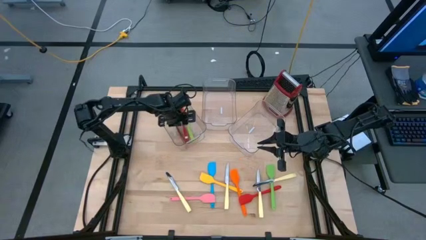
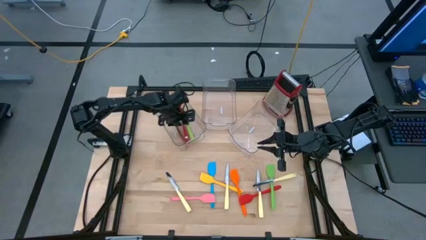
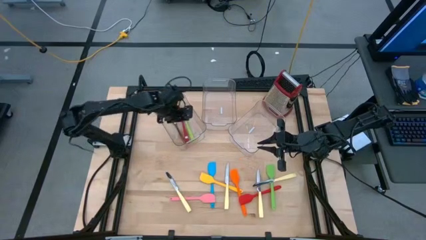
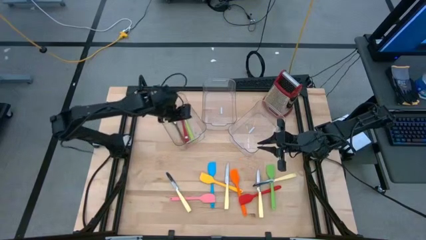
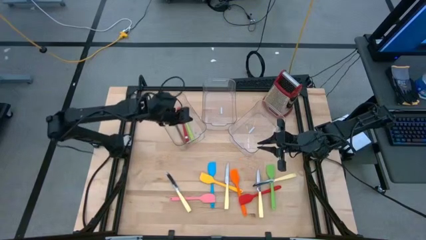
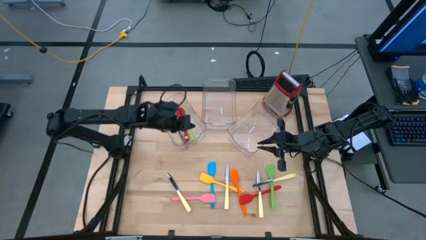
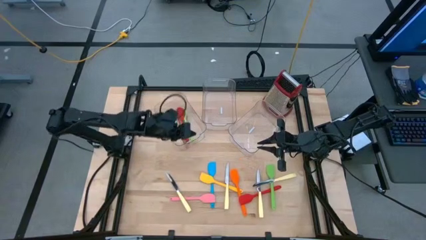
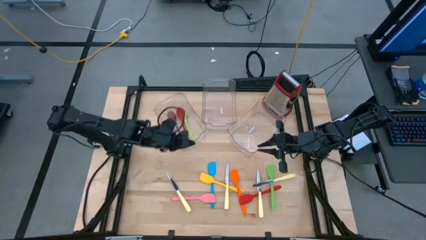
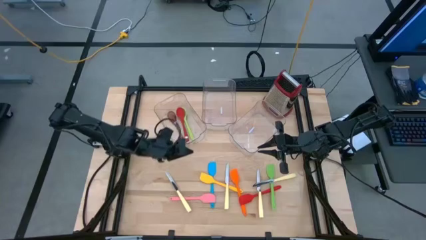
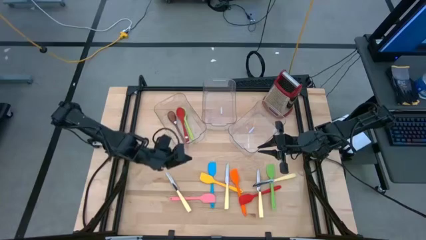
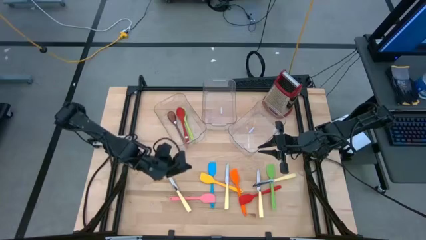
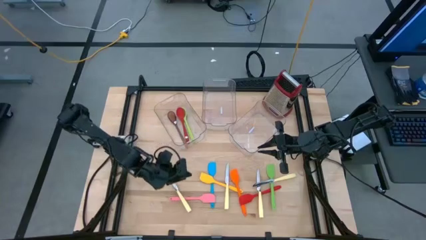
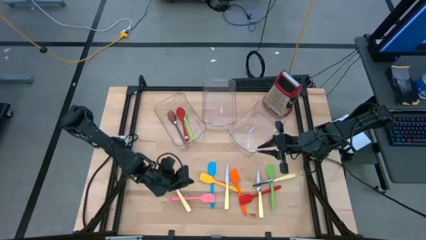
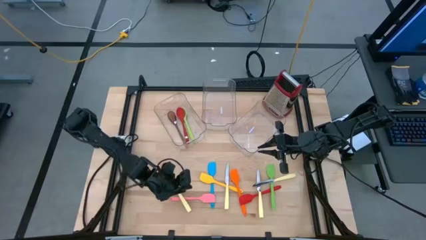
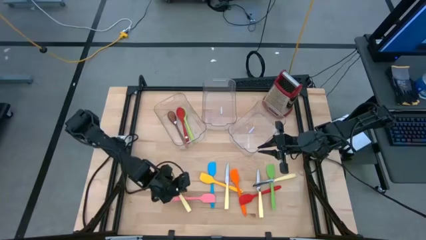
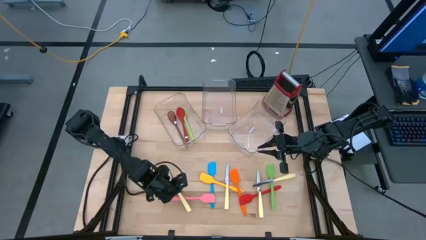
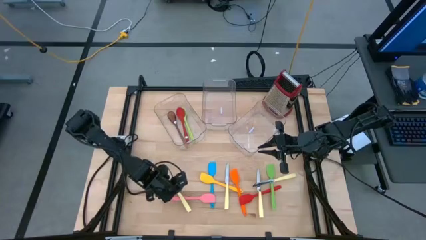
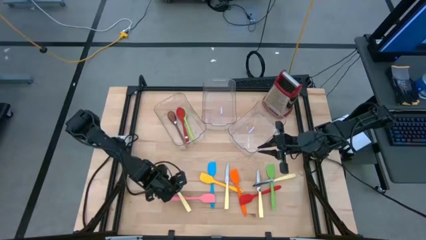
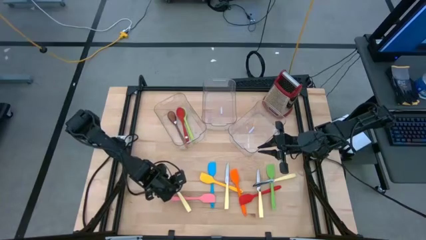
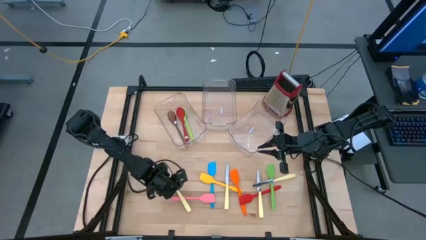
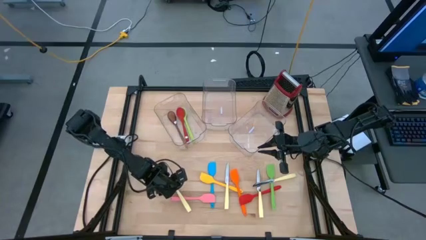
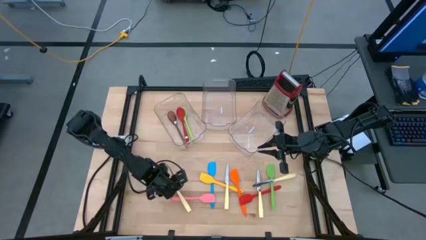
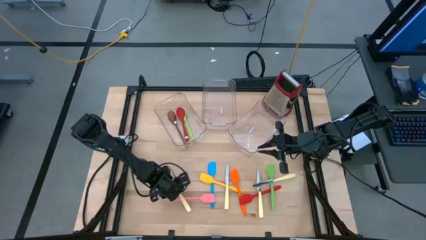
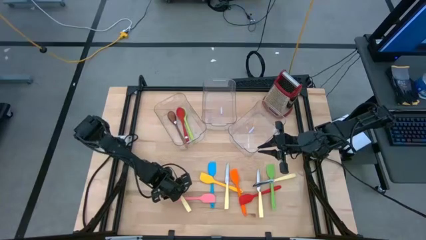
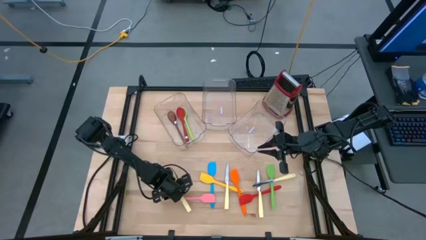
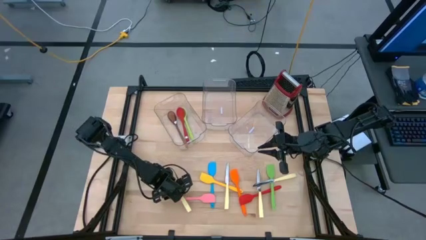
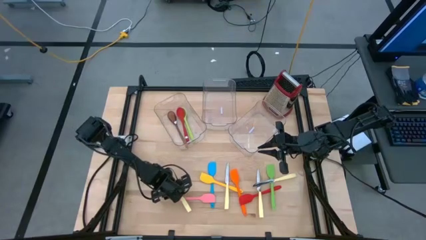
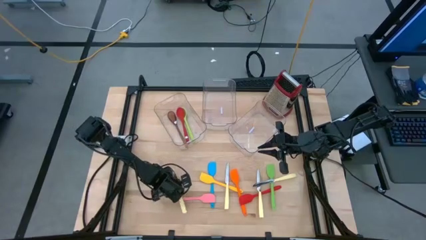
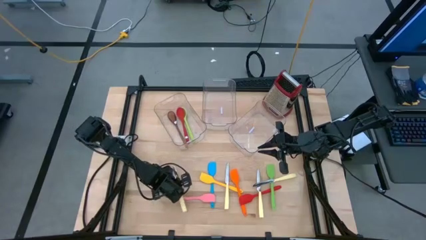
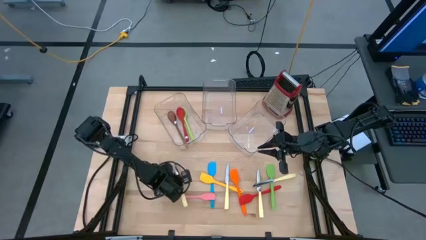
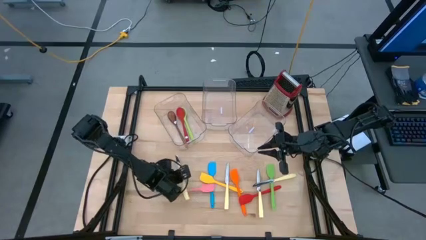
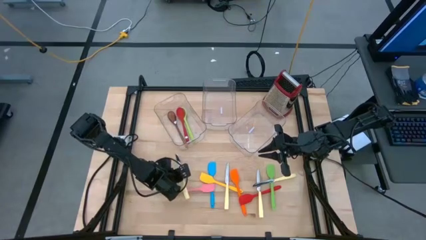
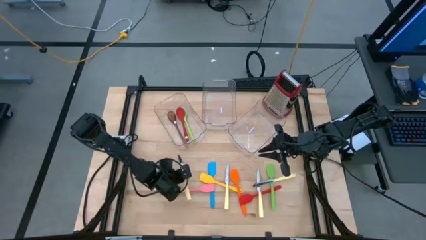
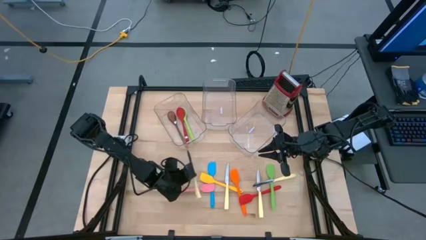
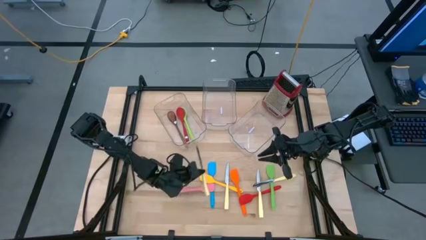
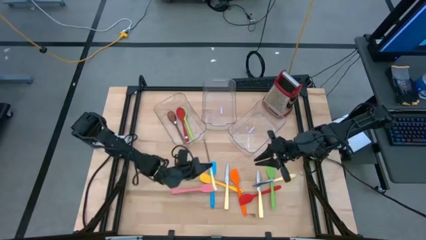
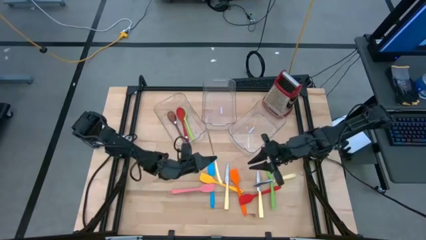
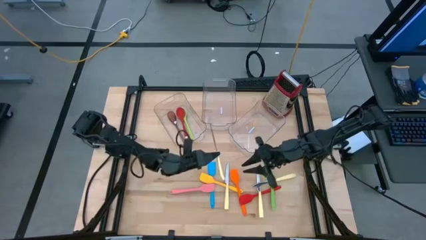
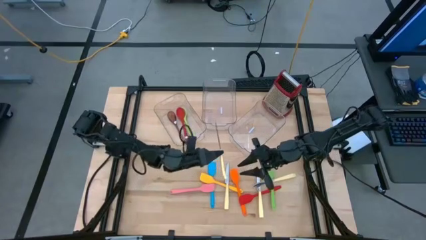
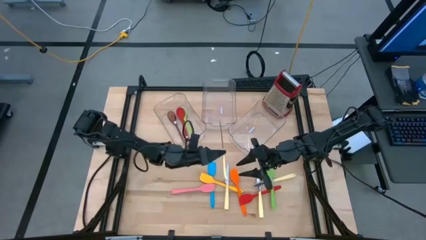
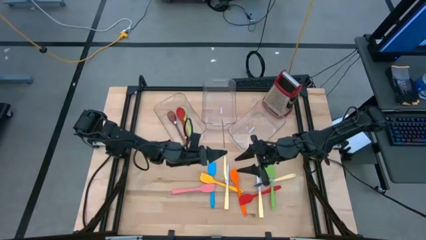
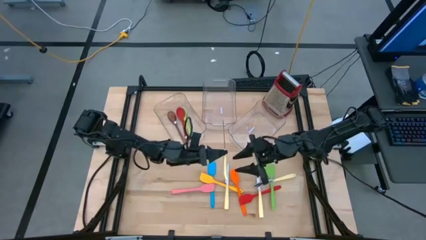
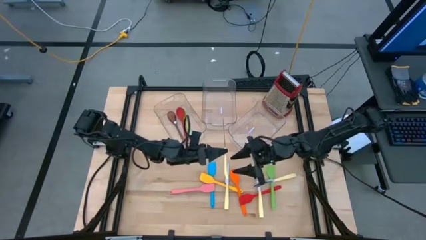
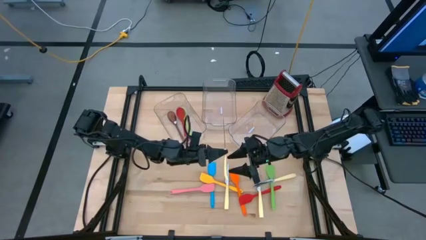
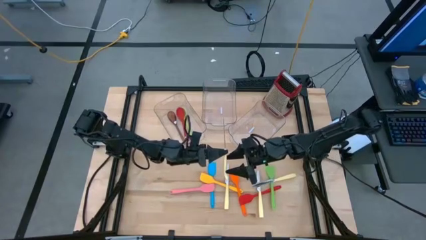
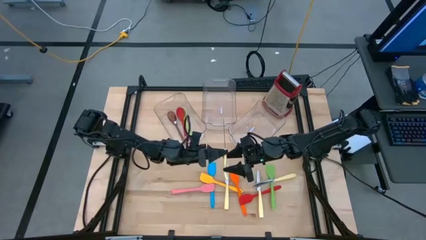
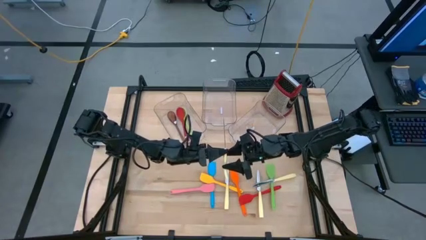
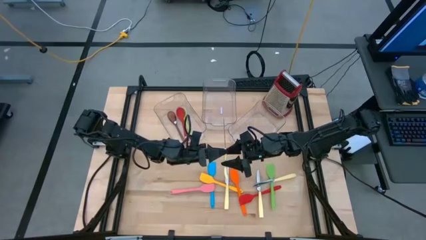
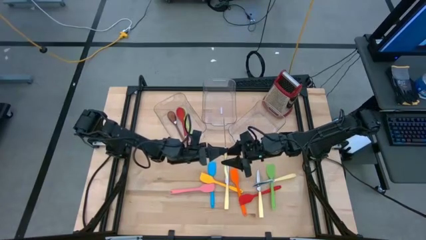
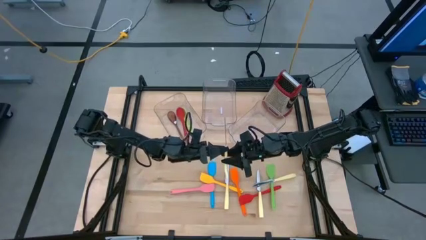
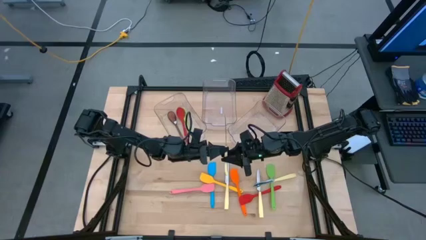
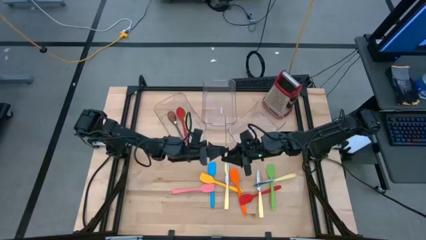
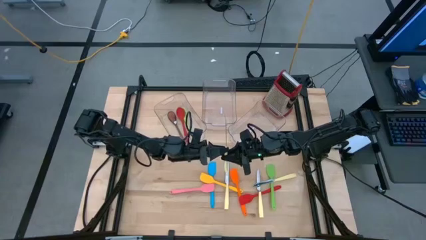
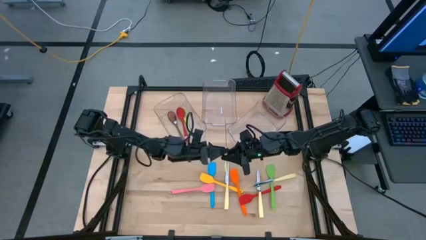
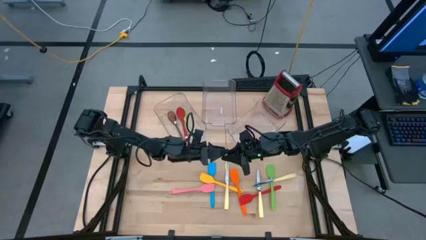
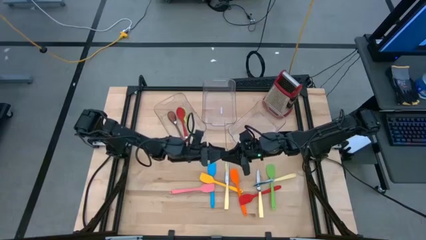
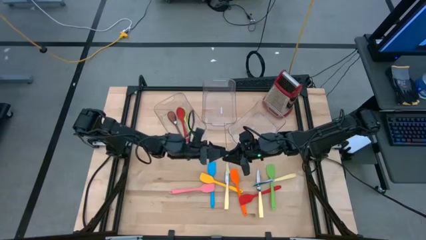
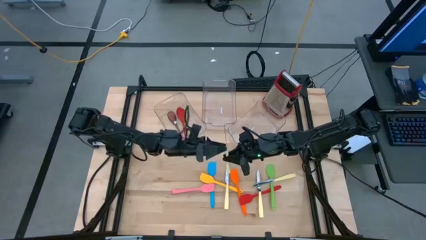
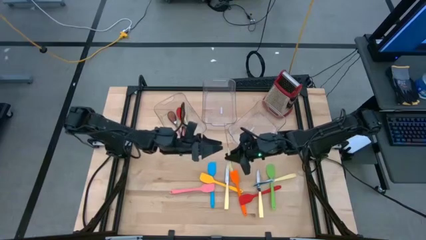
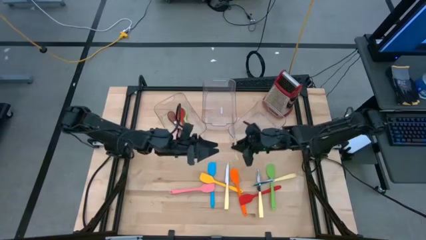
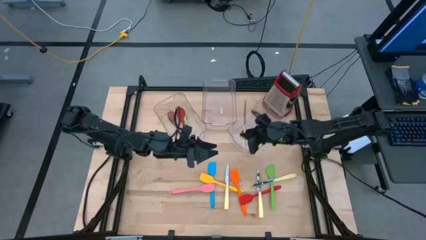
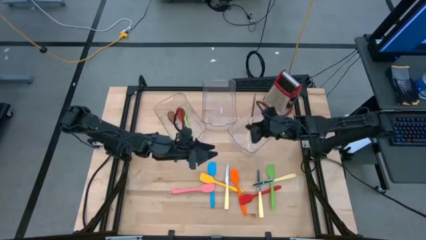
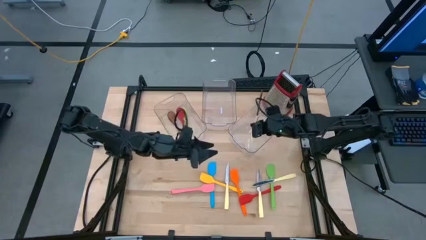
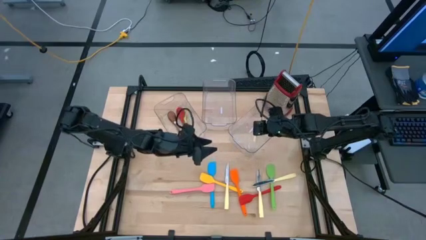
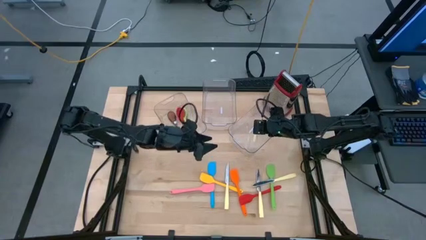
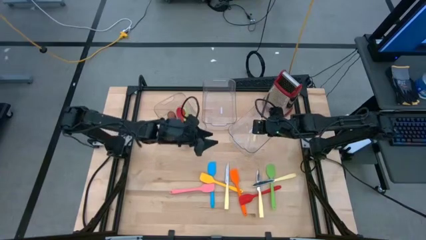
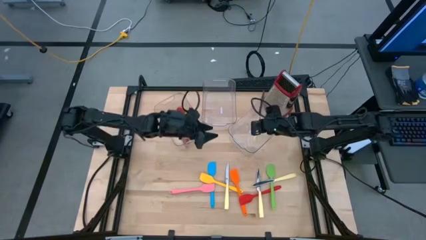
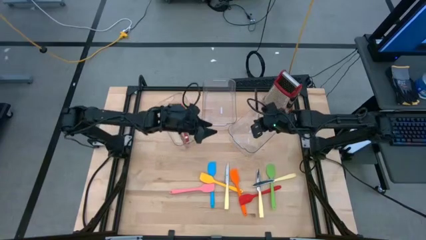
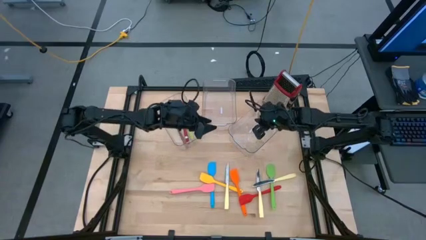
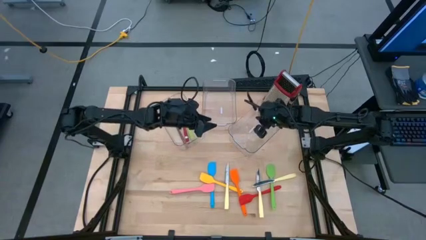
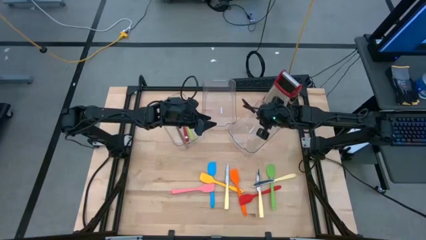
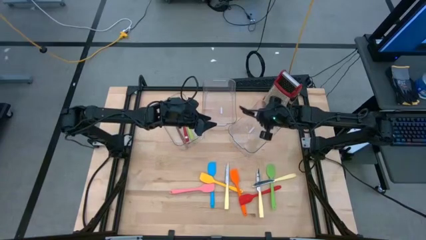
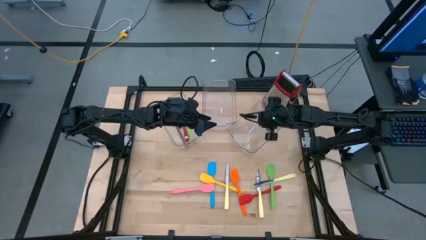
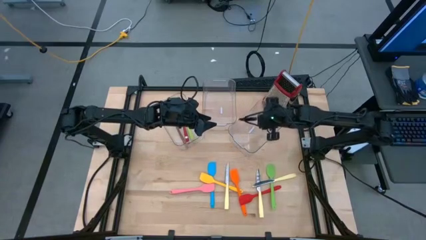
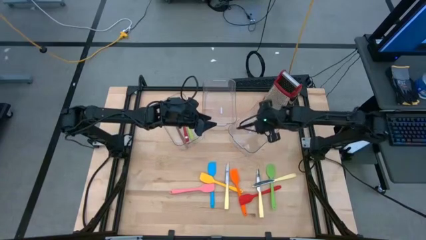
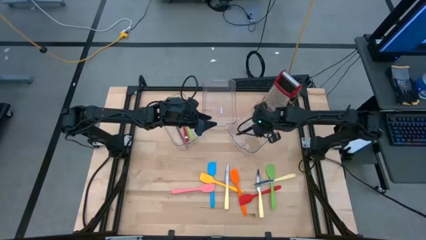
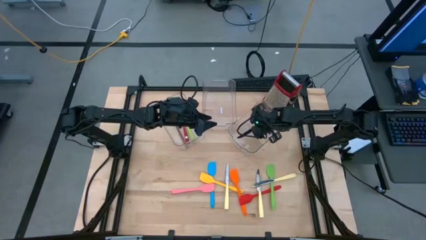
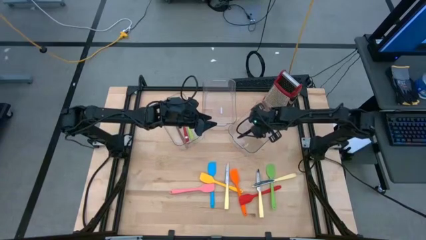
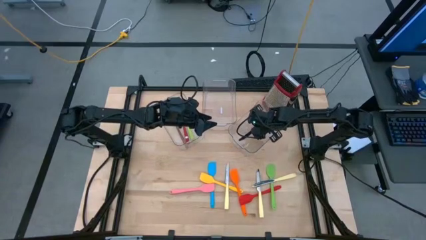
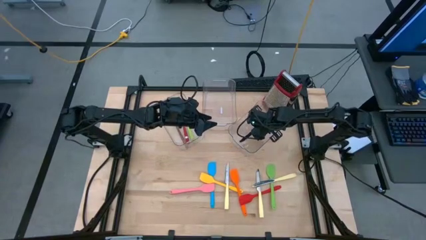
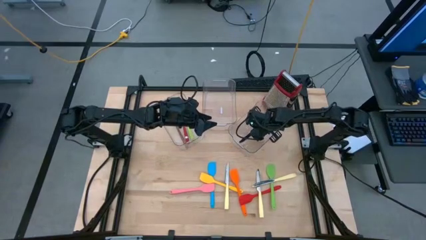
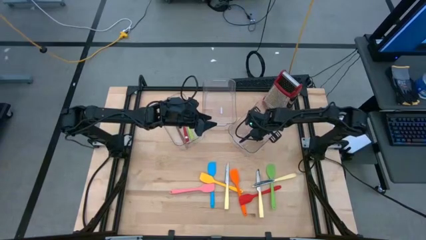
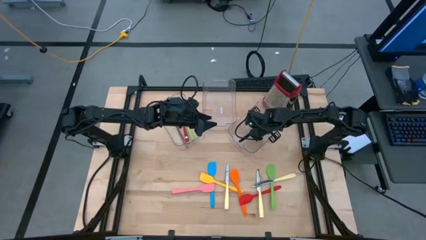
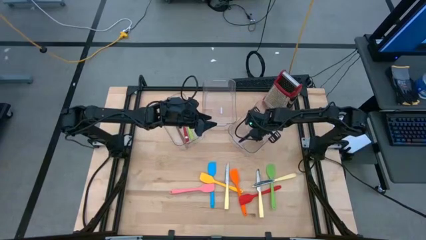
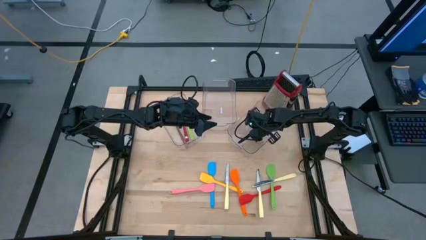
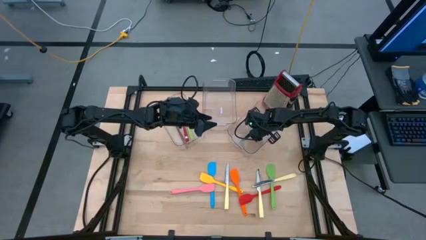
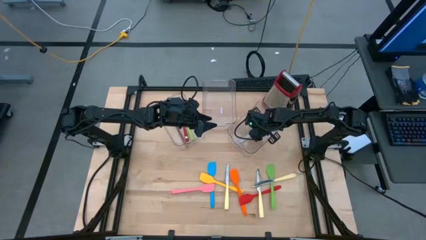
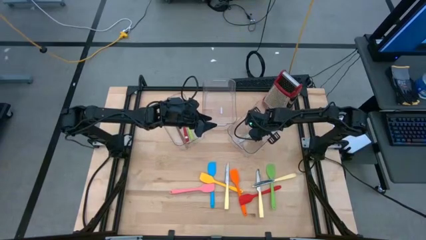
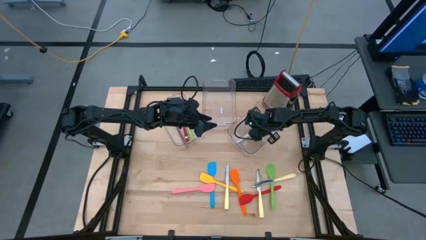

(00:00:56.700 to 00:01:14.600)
Task: Pick & Place Kitchen Items
Put the yellow table knife into the right transparent bin
